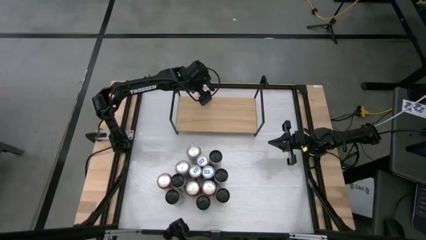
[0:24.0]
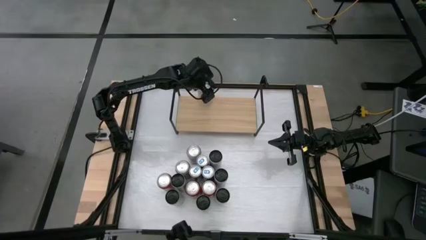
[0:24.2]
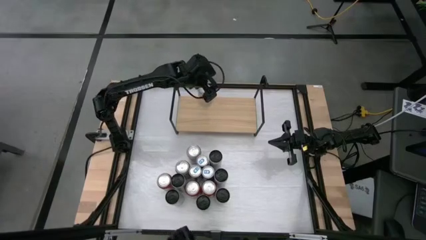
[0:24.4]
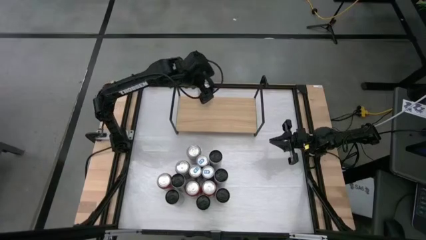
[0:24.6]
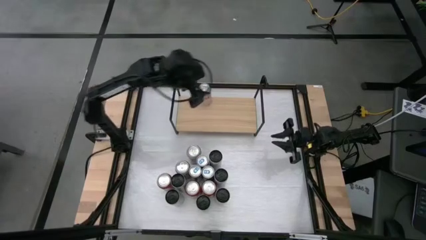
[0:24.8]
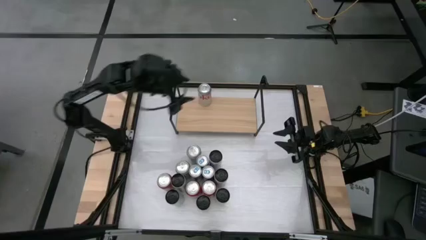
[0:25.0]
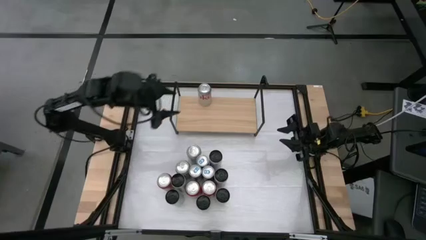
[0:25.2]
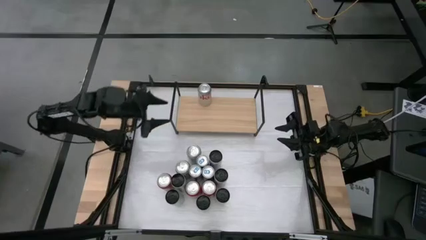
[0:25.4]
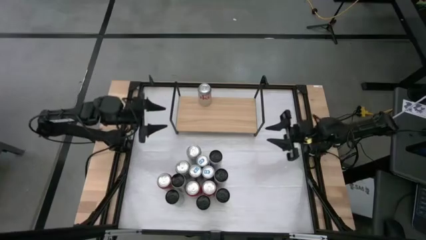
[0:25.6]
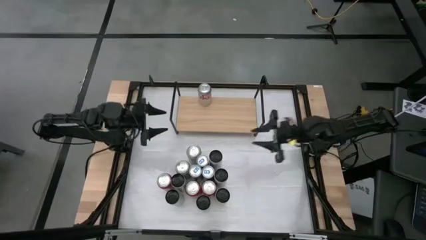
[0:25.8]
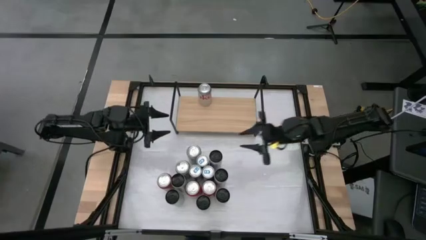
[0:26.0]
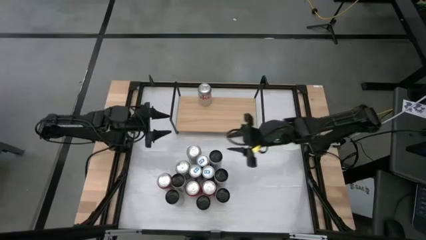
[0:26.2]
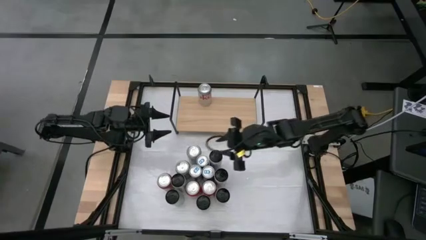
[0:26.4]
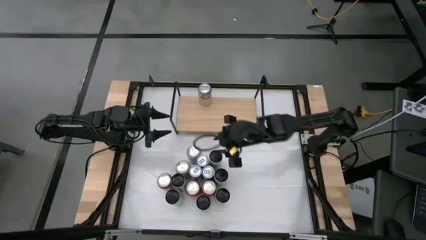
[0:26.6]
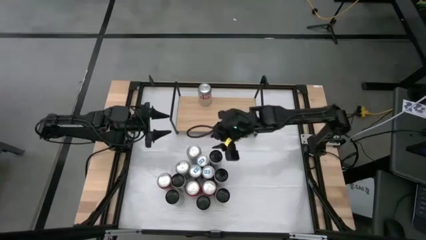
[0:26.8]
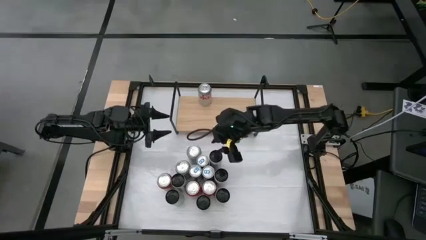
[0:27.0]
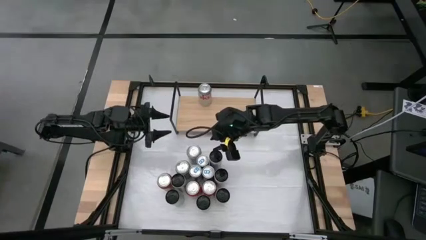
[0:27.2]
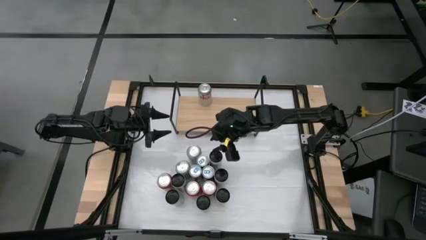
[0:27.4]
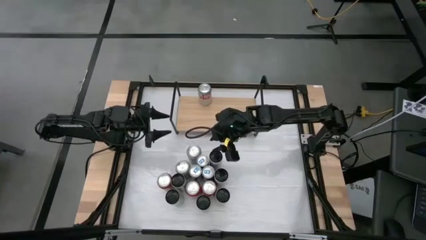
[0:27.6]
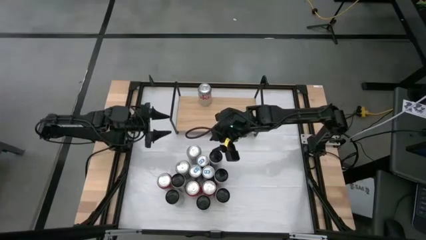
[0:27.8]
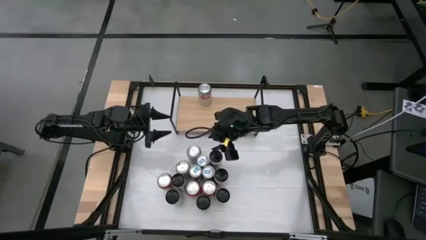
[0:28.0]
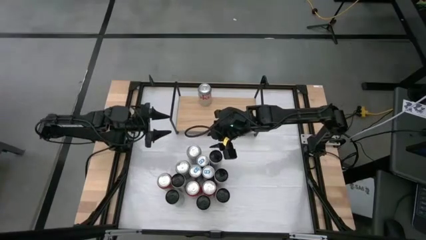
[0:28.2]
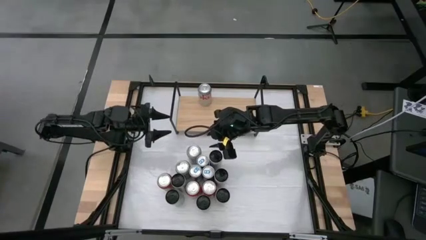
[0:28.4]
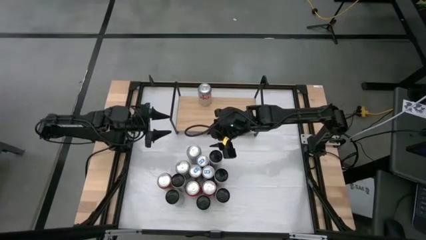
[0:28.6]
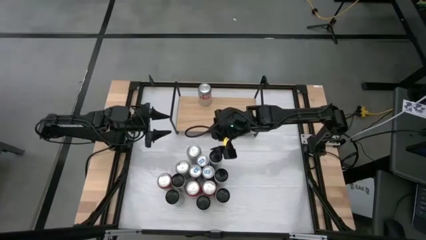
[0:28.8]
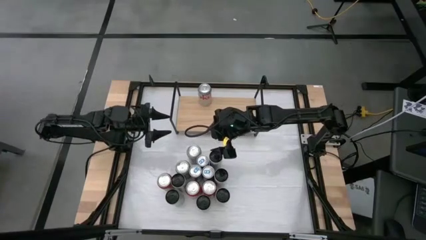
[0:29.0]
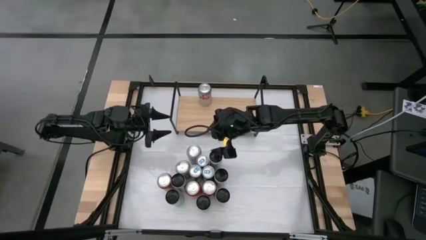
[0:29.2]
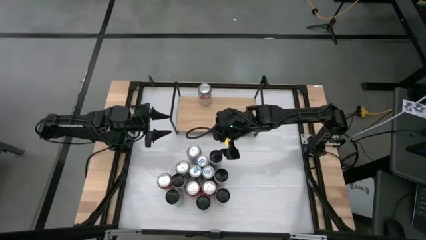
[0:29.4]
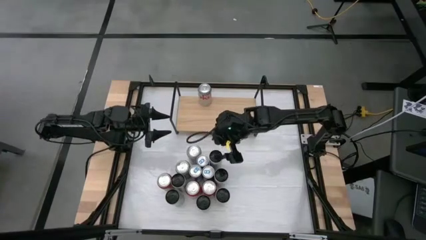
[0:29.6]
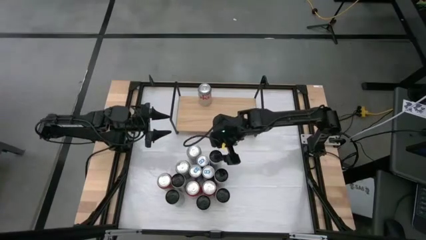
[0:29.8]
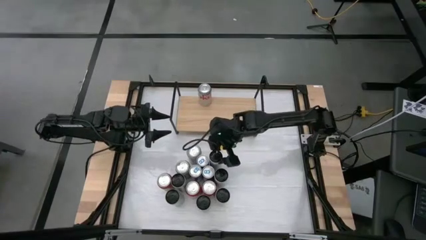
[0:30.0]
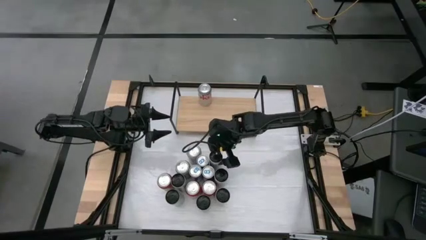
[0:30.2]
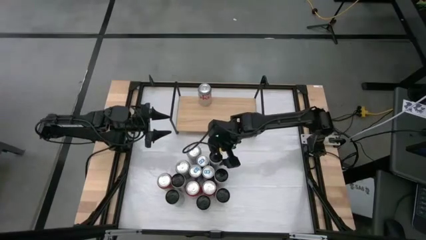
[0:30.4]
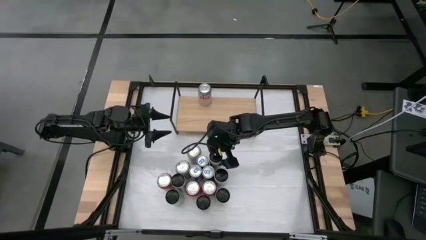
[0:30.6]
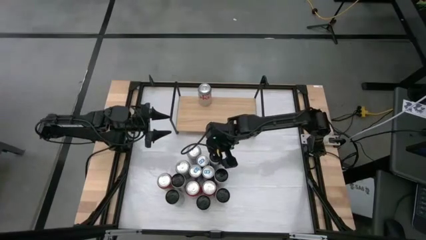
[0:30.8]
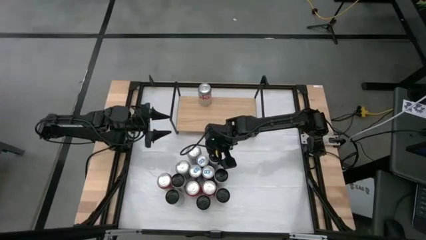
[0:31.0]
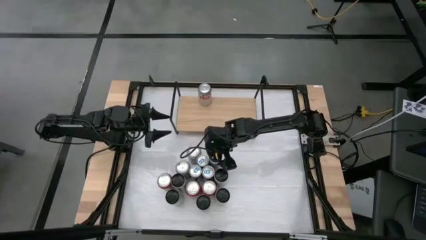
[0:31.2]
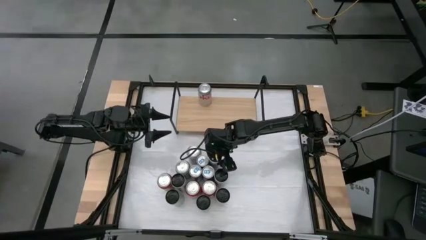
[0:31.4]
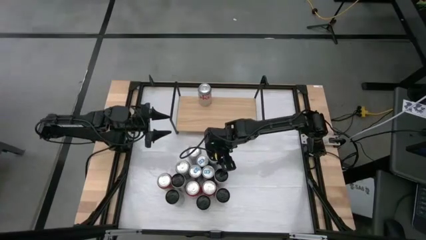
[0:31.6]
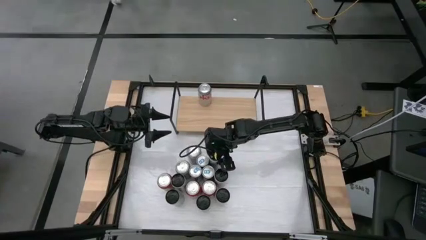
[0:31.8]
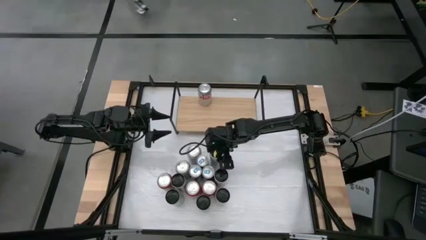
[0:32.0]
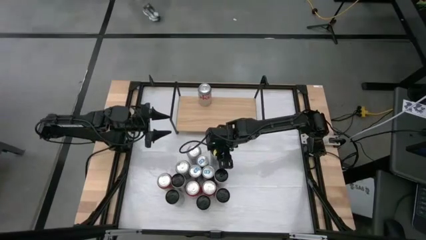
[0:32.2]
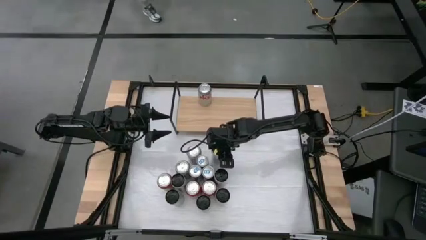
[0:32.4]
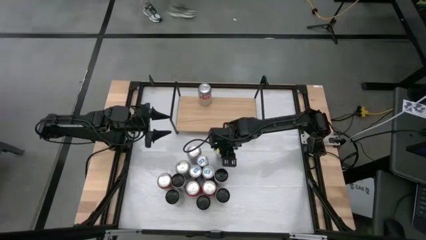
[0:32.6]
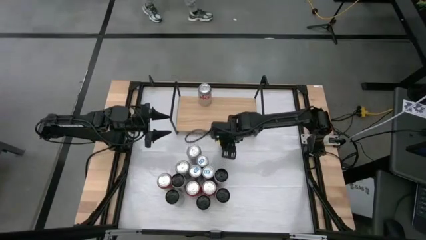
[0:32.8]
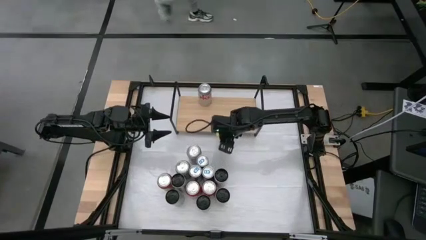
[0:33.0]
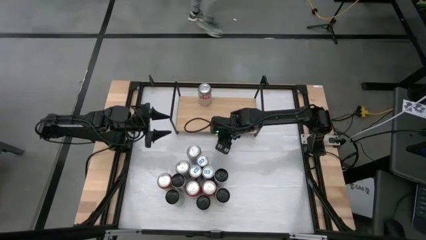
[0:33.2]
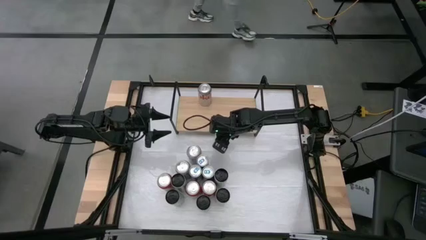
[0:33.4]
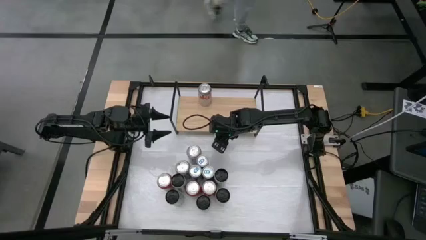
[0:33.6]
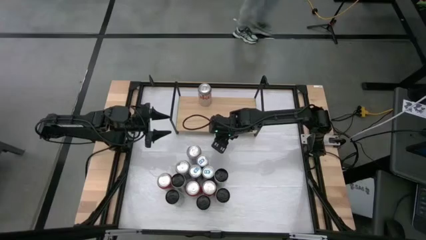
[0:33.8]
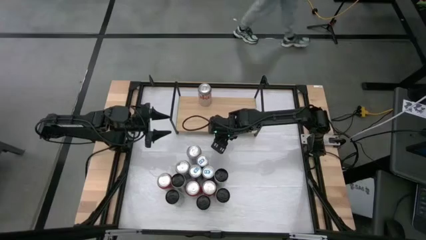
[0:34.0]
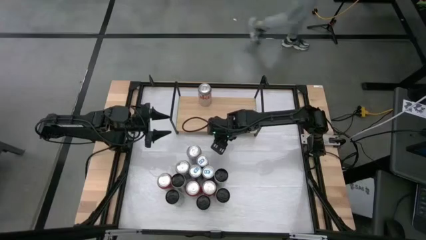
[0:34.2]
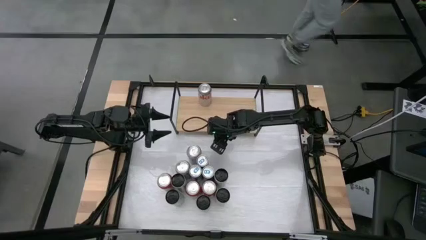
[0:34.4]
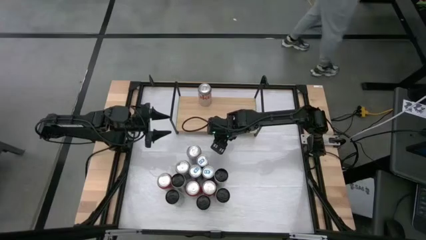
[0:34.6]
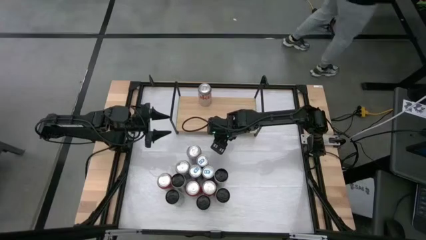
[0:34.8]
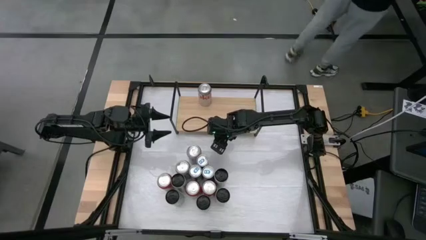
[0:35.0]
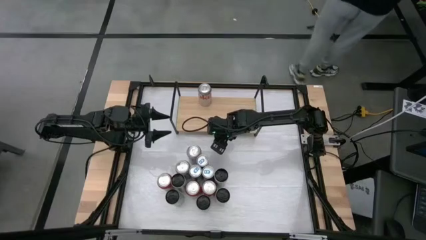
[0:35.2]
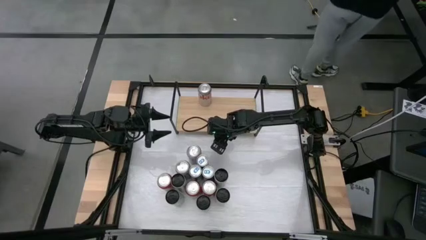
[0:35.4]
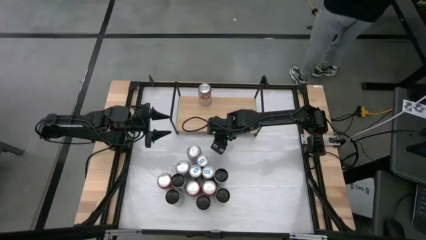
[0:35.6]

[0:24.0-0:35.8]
Task: Place canned beverage on shelf
Put the white yellow soda can onto the shelf

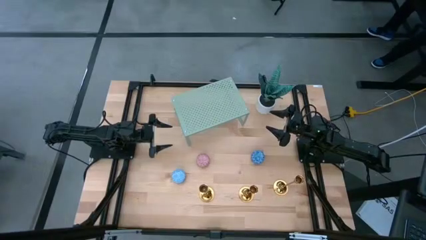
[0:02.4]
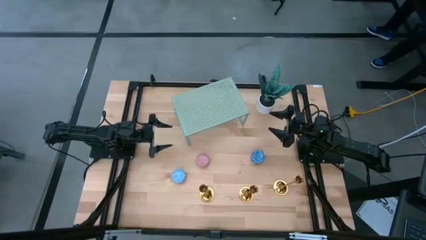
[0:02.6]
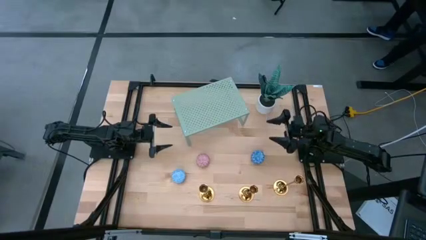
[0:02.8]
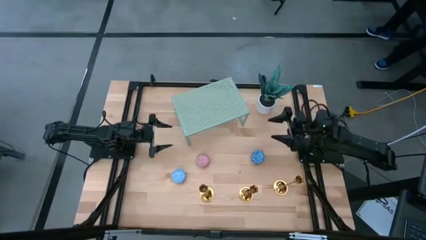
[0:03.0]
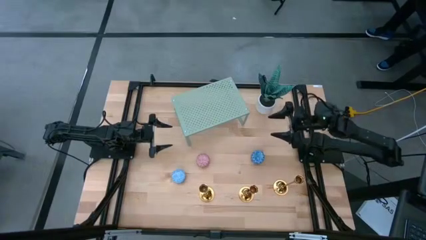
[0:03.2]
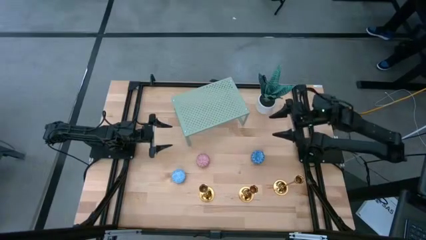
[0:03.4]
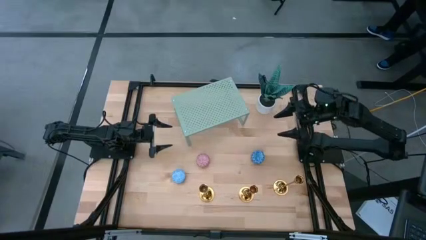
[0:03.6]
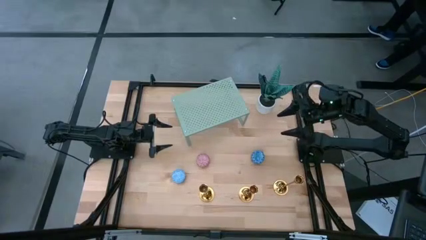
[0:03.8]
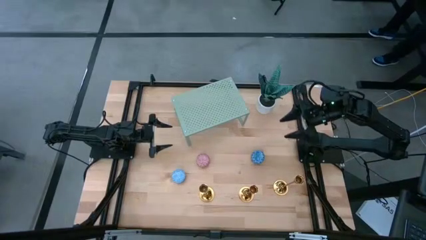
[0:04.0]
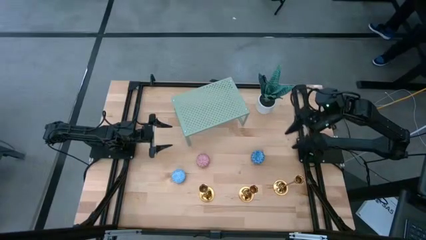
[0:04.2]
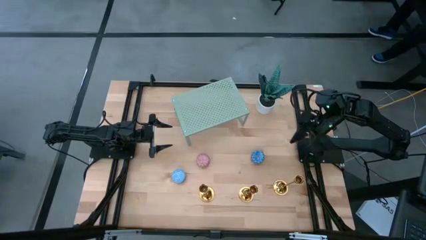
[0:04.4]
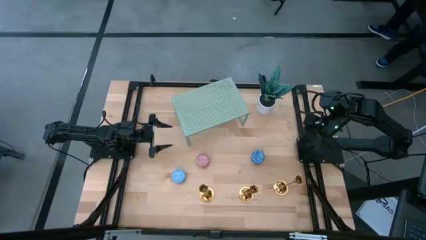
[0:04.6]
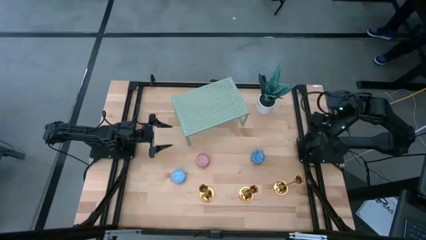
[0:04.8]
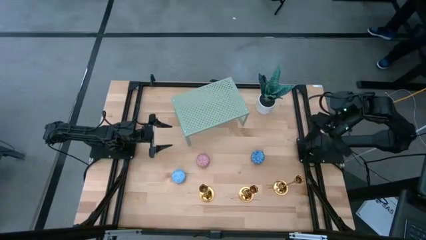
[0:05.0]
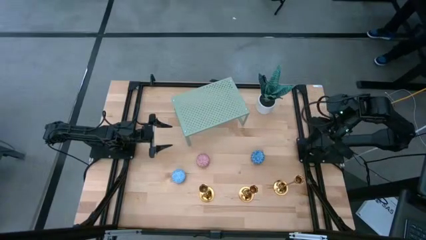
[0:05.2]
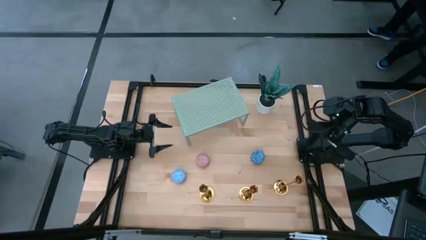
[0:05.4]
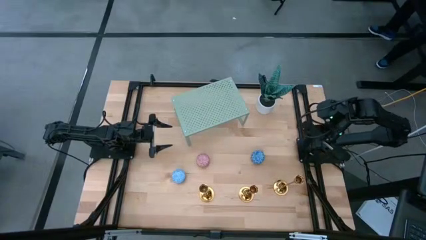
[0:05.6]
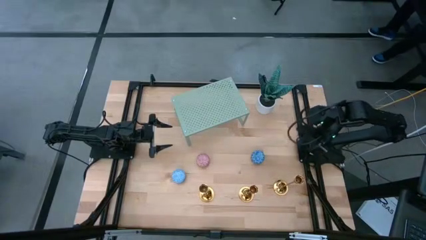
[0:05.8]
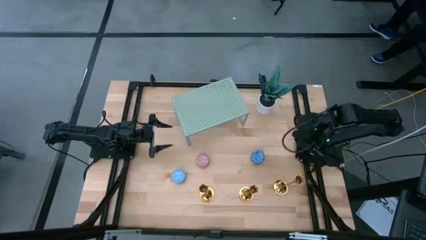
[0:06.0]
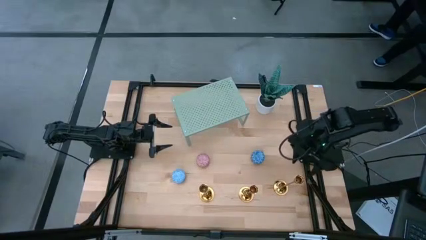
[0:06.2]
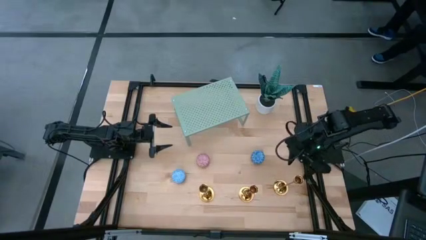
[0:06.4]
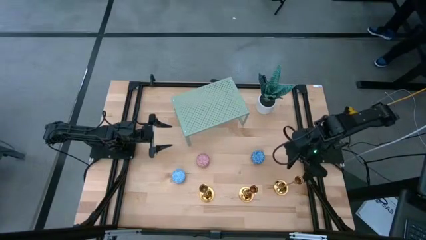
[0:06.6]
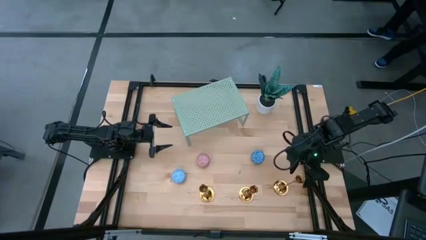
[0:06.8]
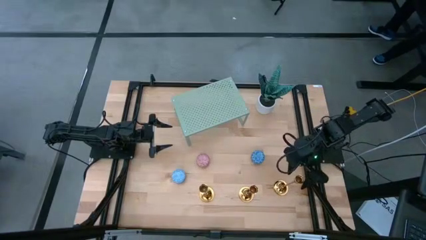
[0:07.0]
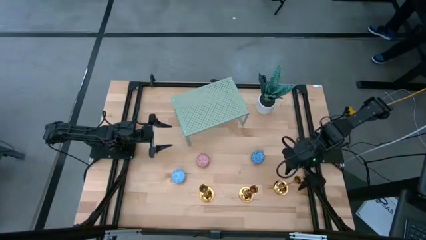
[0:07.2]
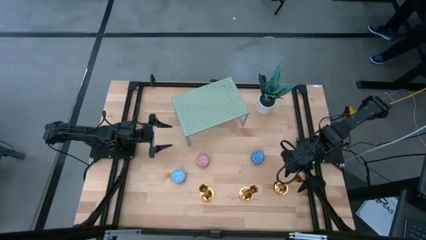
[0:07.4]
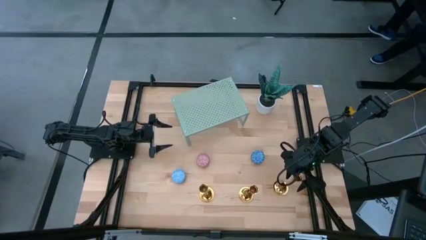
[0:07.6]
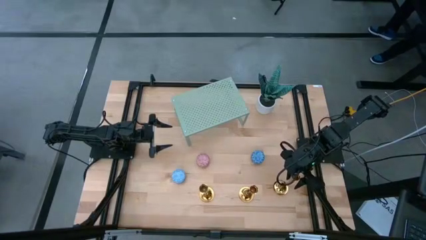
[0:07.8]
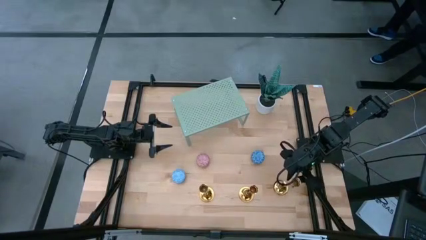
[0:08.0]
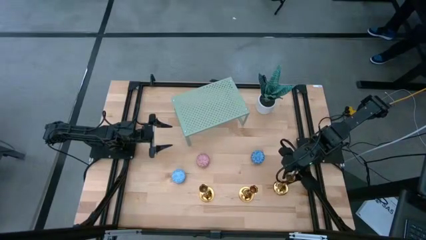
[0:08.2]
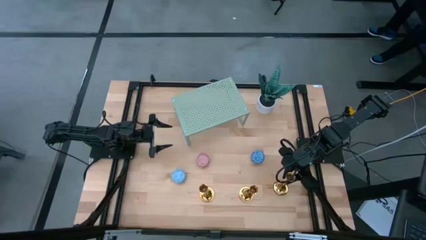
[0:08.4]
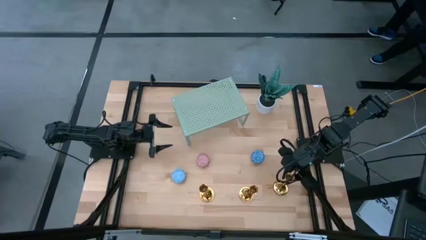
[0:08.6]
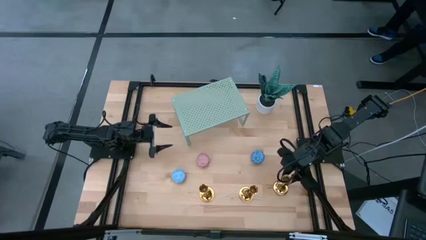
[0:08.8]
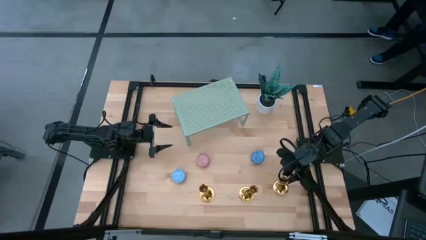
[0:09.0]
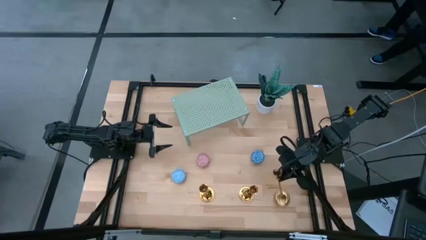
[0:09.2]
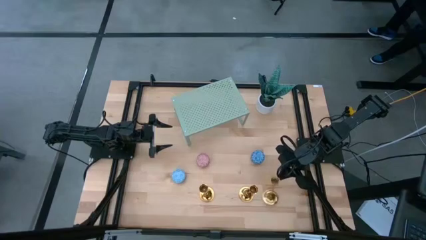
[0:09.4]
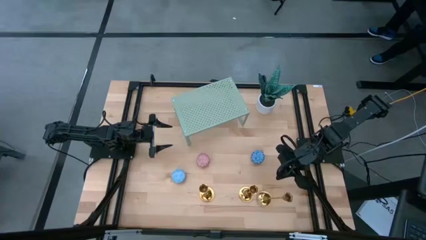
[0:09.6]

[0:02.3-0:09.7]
Task: Pick & Place candle stick holders
Put the right gold candle holder on the shelf
